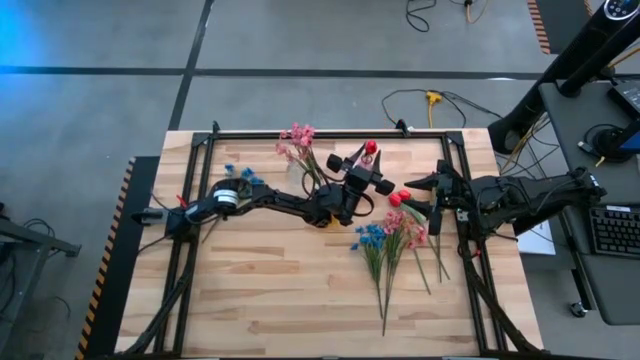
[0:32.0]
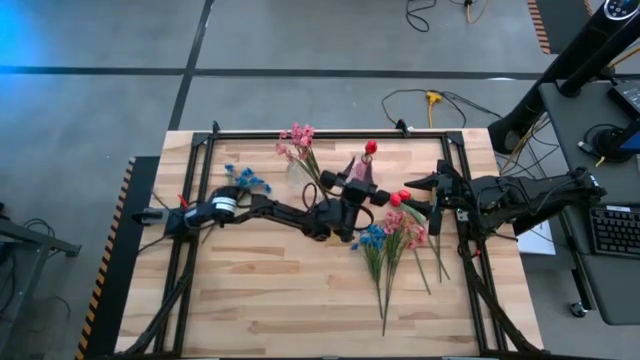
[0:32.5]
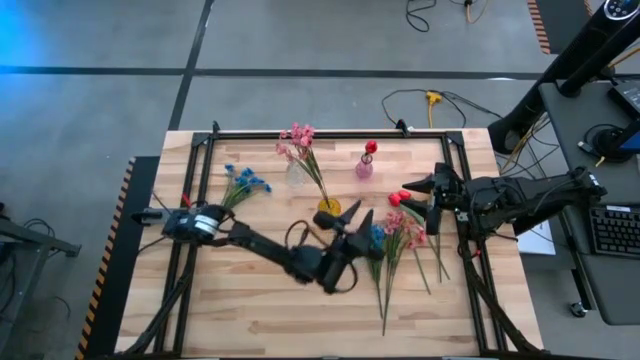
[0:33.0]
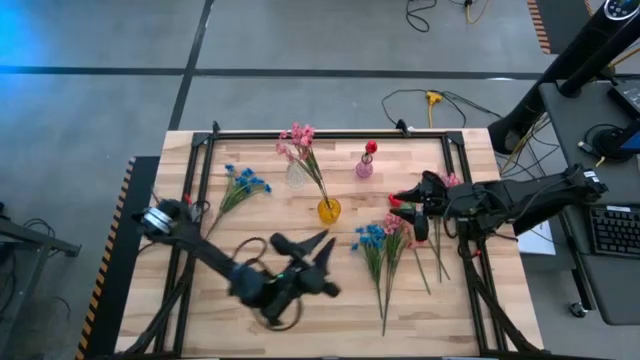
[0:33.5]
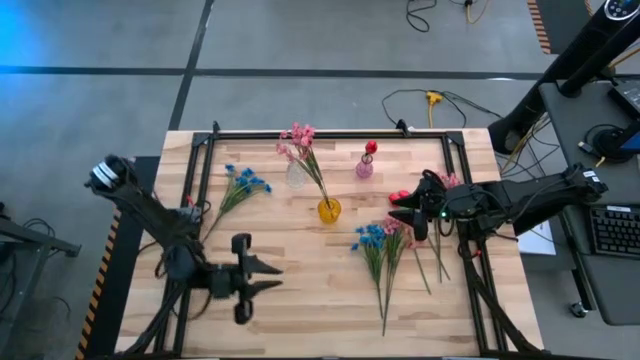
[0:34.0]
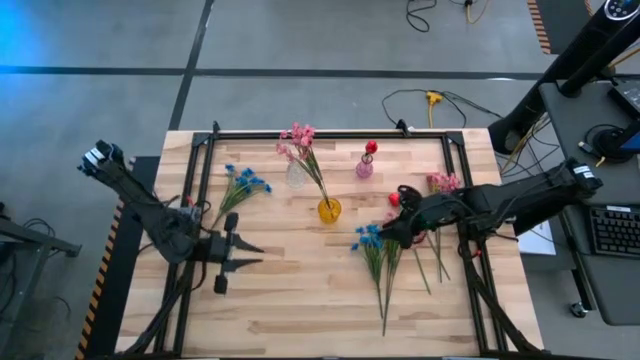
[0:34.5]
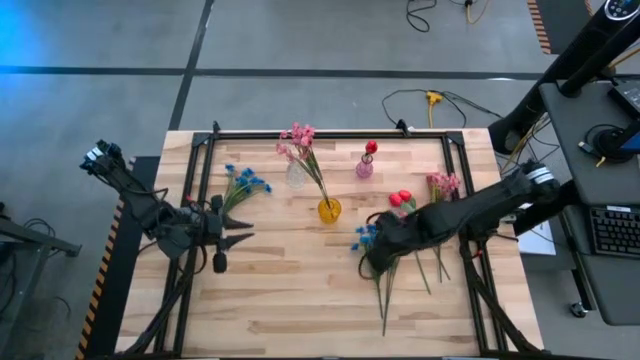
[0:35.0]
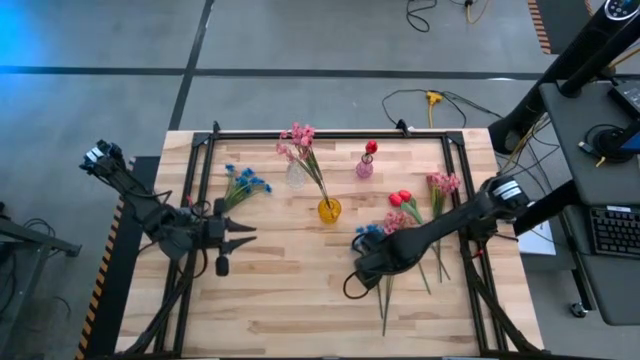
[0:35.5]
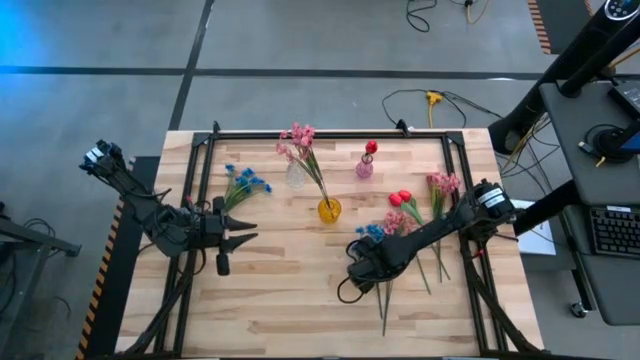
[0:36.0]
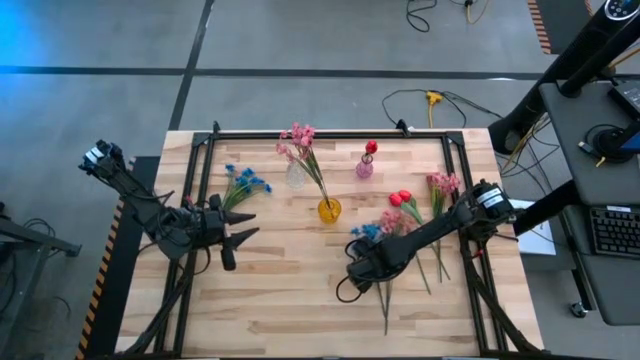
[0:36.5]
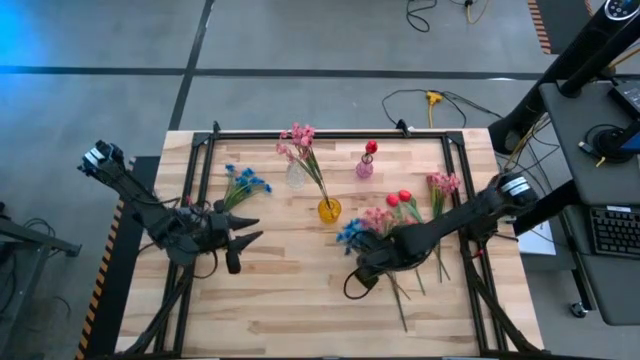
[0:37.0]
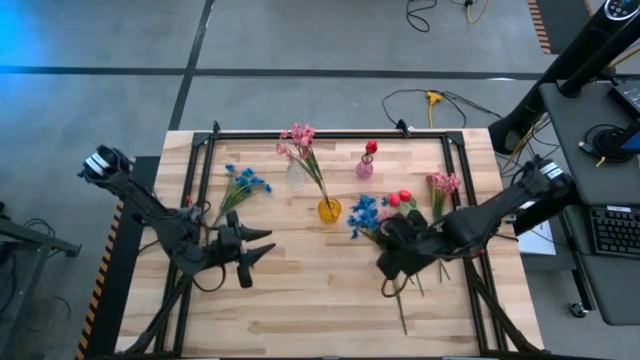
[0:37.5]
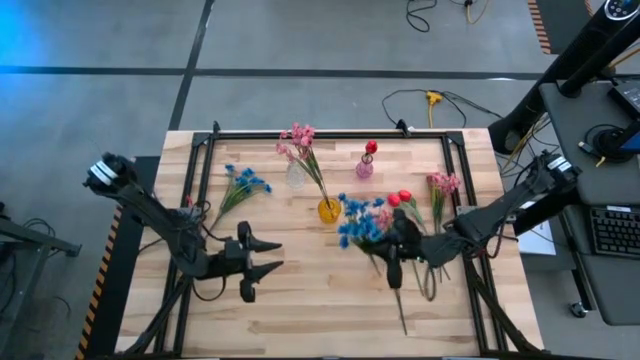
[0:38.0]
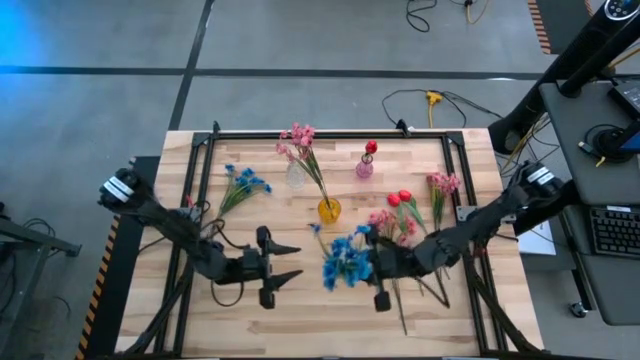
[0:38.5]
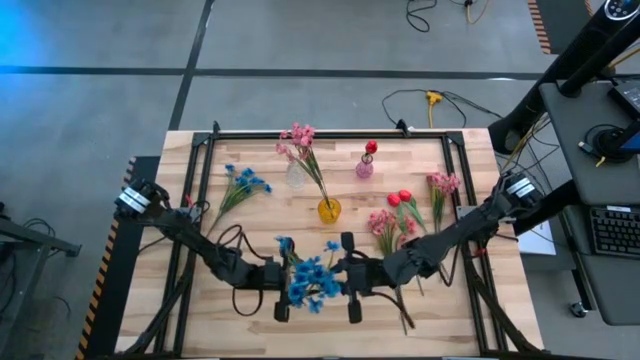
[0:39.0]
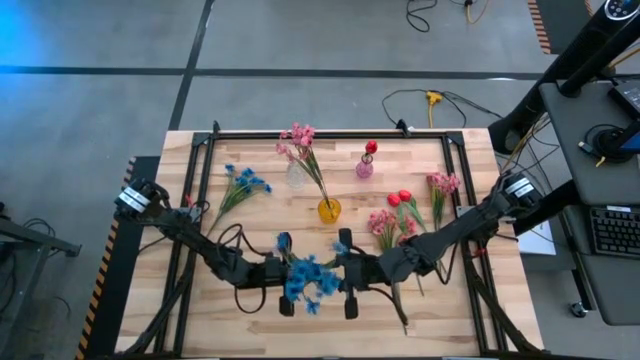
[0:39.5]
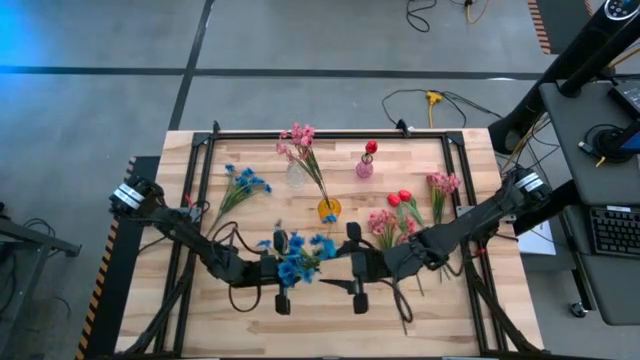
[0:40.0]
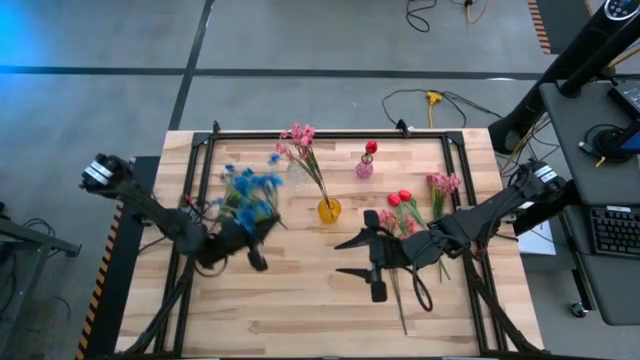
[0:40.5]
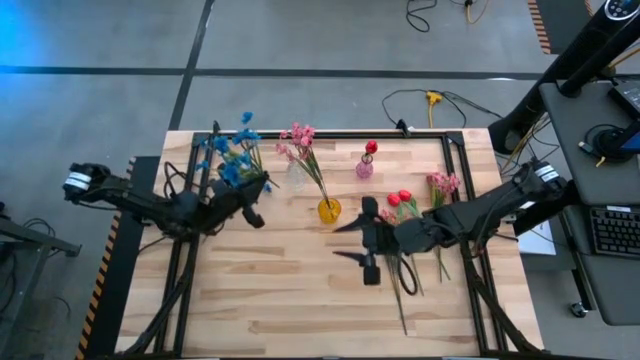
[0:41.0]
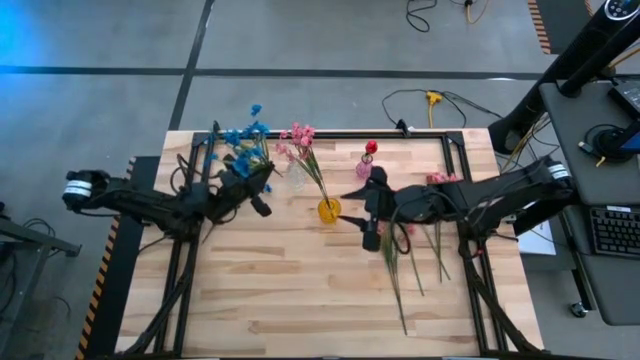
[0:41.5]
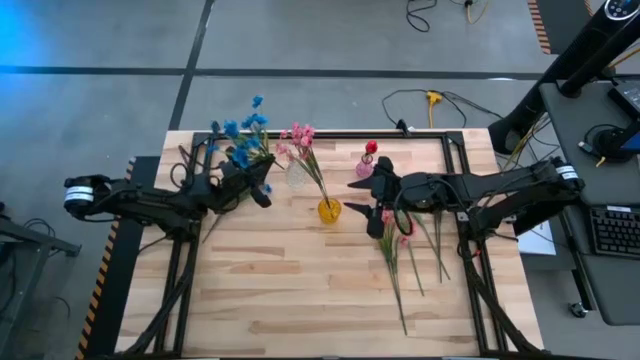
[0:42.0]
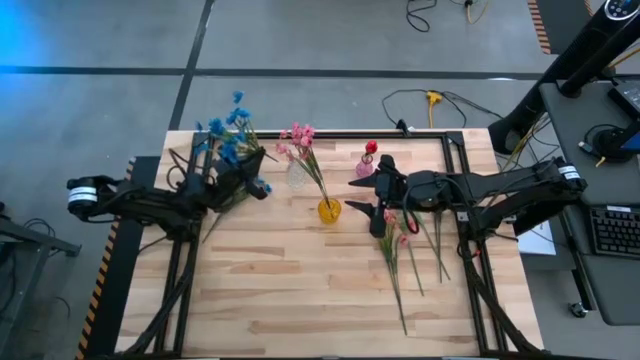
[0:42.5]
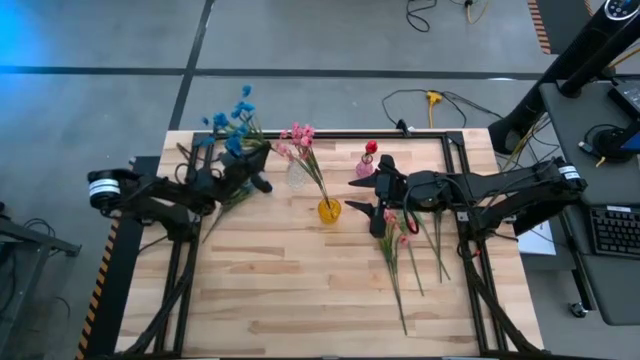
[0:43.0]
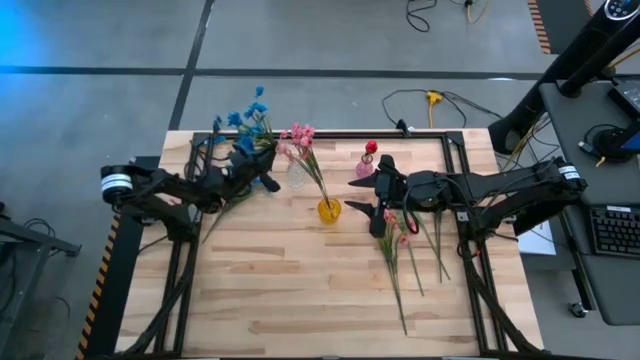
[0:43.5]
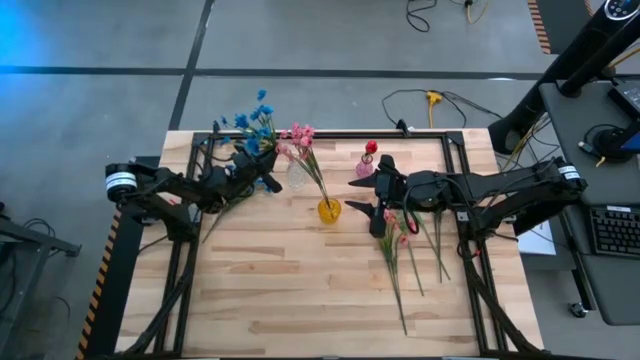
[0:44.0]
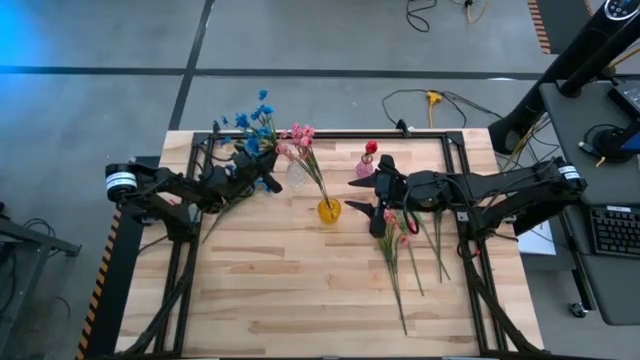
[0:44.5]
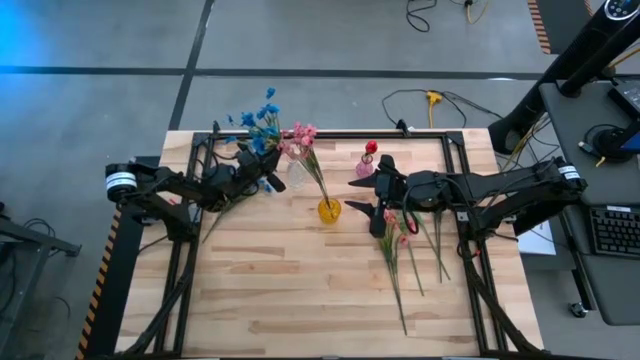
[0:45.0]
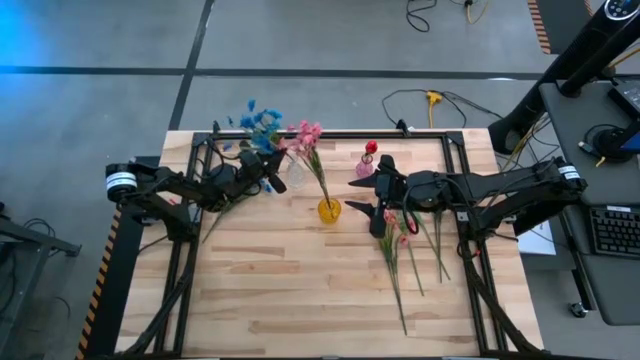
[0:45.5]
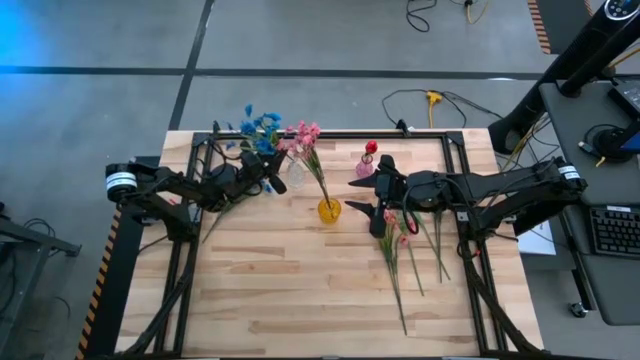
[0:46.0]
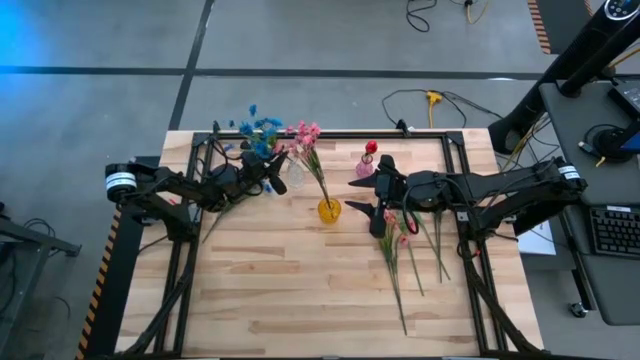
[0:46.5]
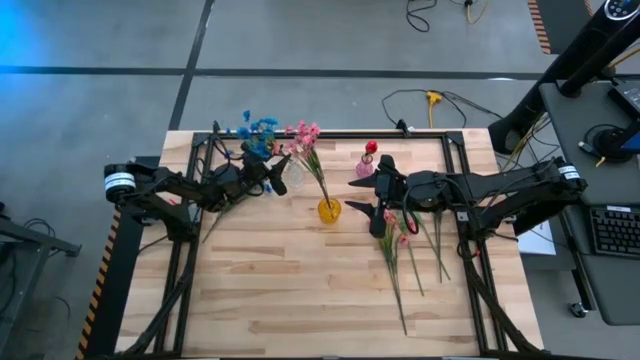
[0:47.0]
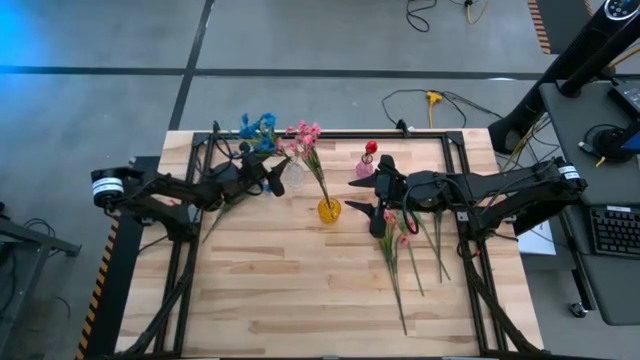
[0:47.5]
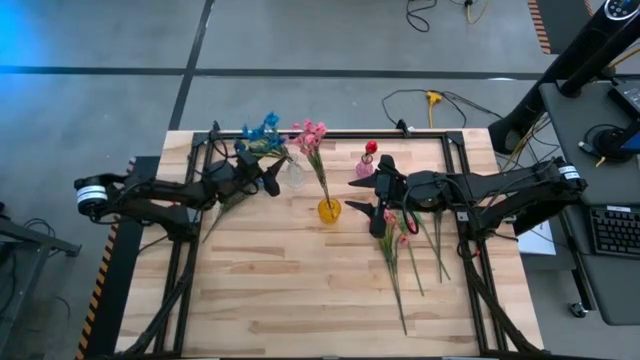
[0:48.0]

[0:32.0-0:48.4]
Task: Sort flowers into vase by color
Put the left blue flowers into the transparent vase

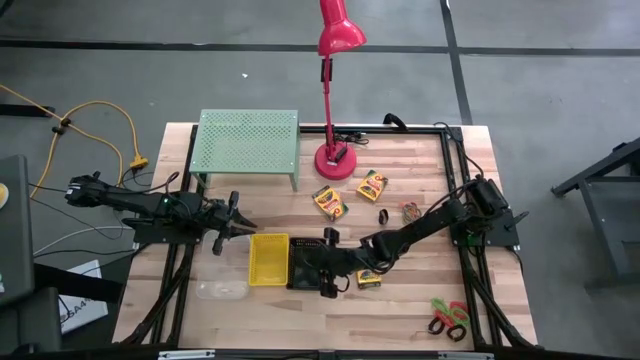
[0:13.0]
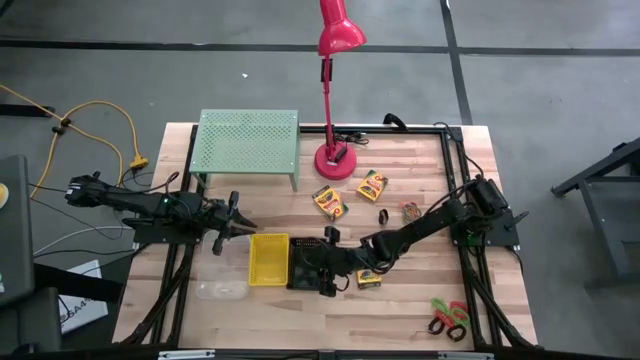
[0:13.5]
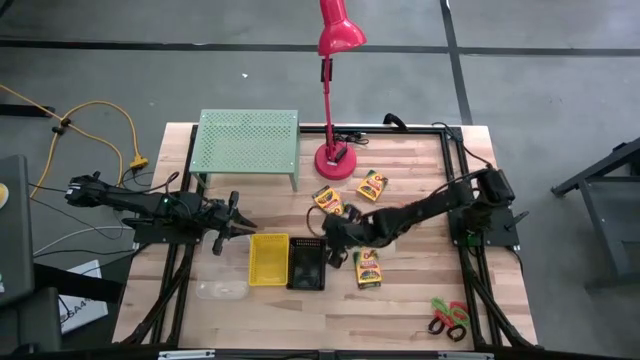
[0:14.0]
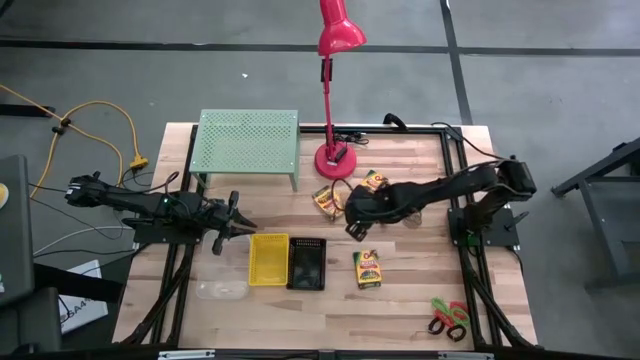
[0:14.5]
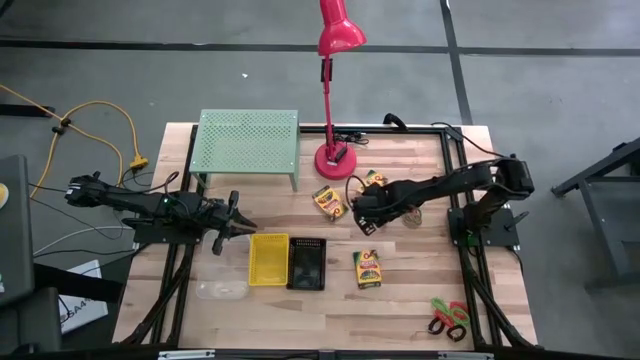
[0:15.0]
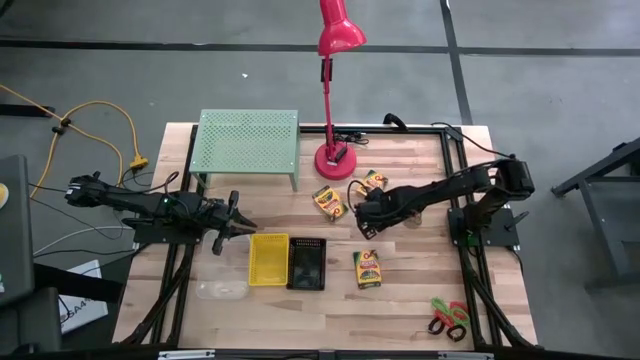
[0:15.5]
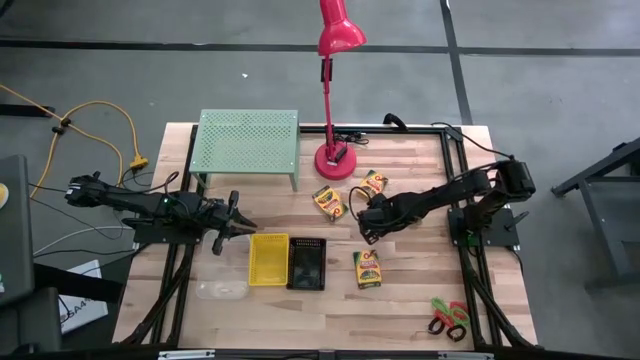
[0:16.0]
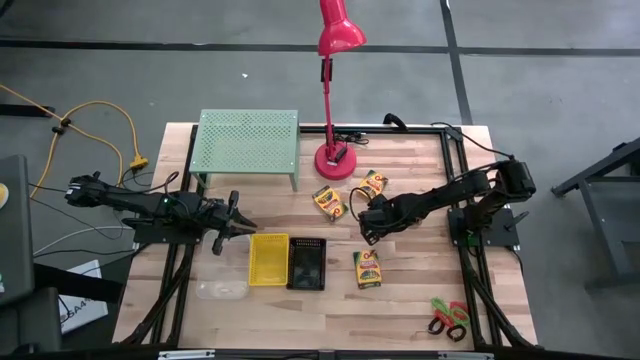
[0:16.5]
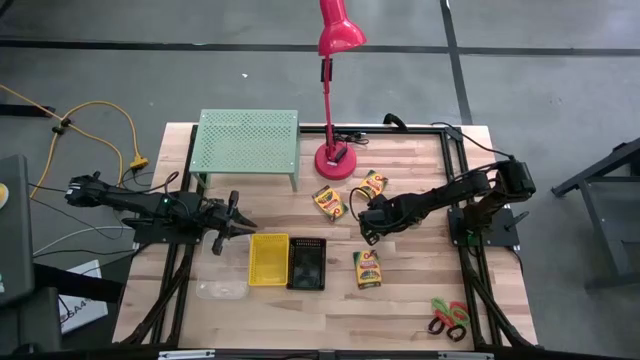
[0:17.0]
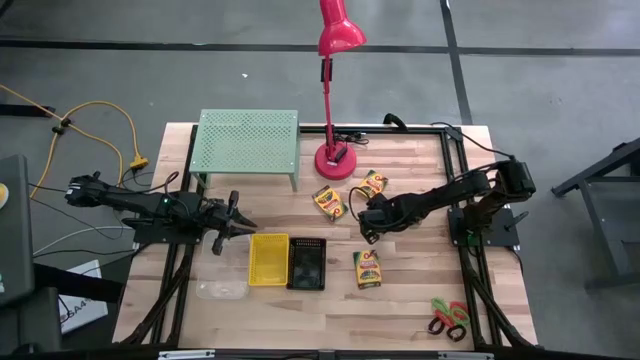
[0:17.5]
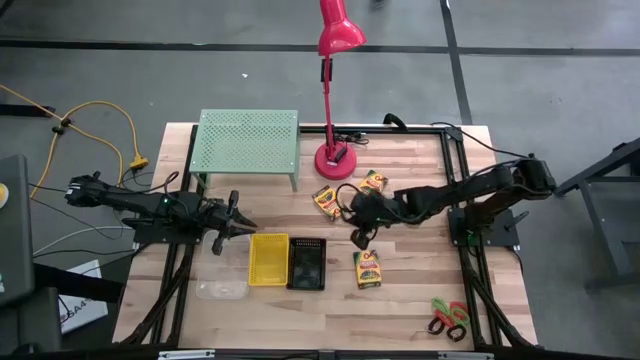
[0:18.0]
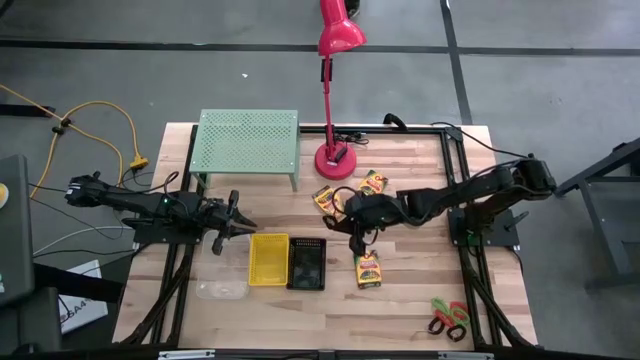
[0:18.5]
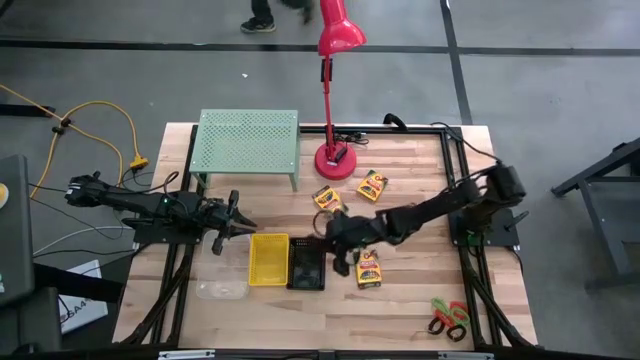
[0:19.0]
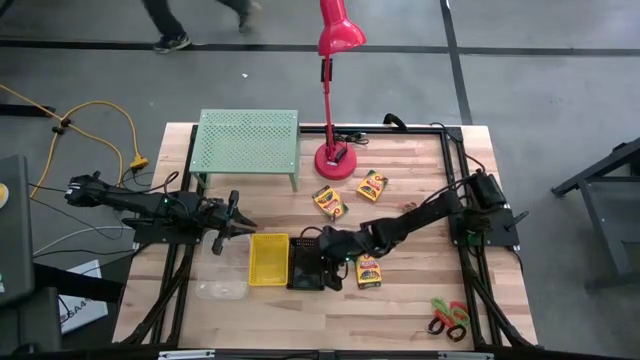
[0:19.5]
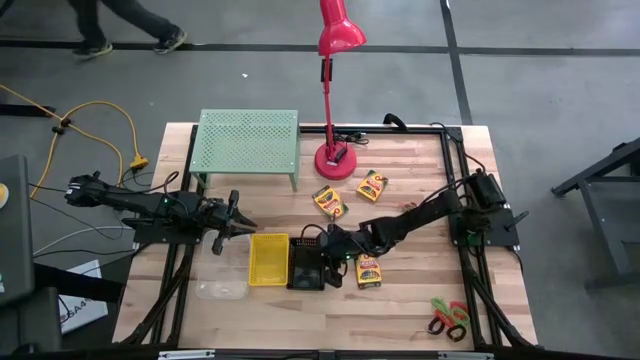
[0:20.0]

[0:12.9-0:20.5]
Task: Pick & Place Office Desk Supplies
Put the black rubber band into the black bin
